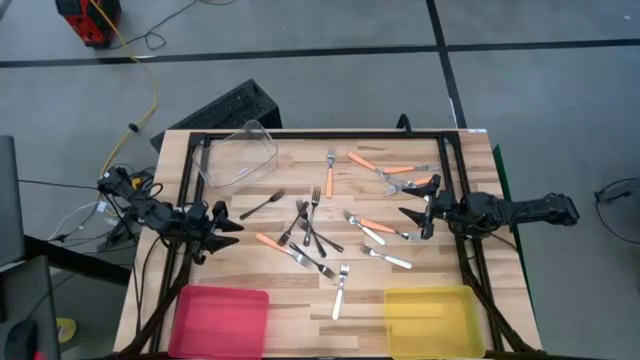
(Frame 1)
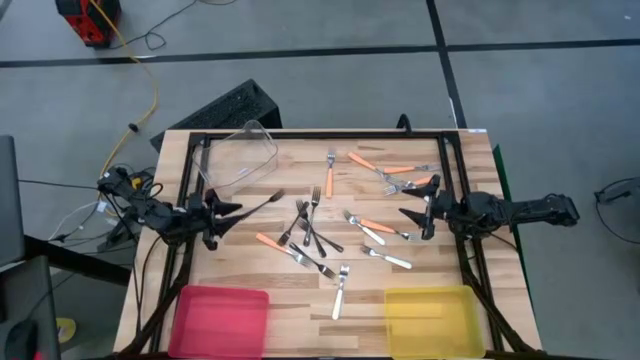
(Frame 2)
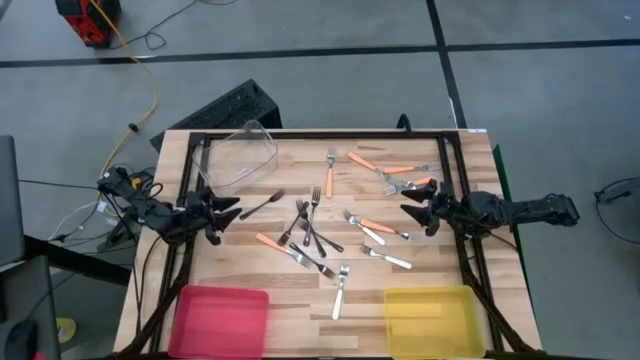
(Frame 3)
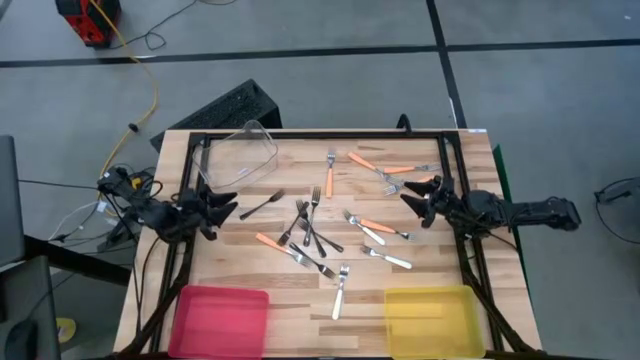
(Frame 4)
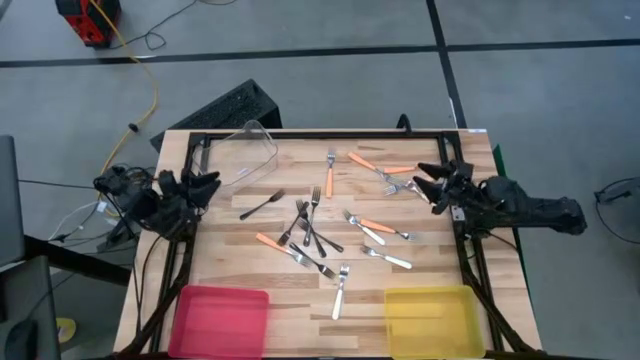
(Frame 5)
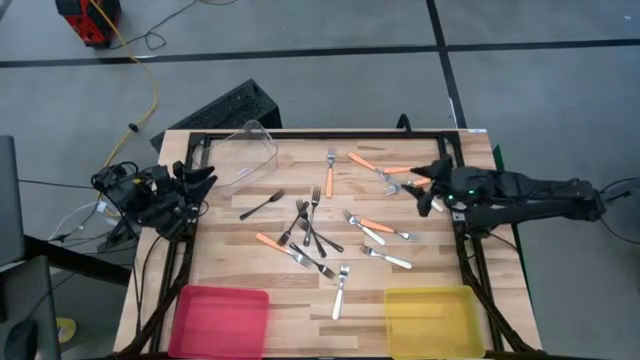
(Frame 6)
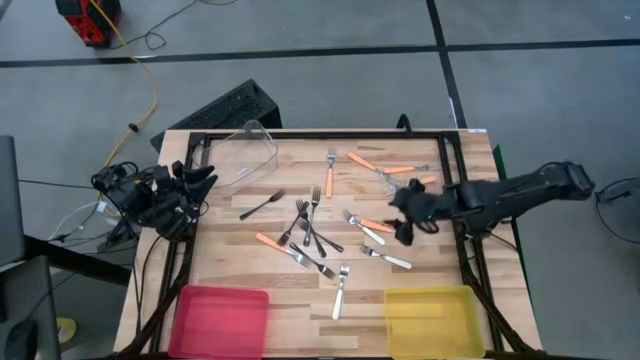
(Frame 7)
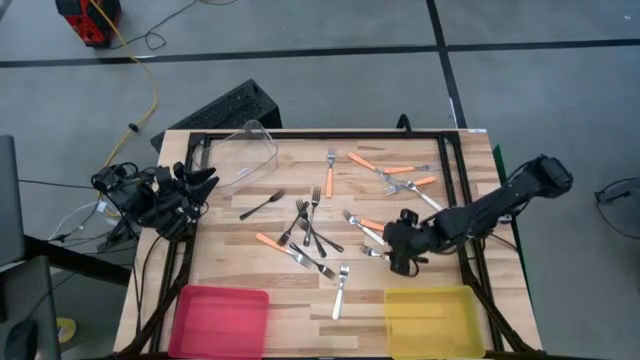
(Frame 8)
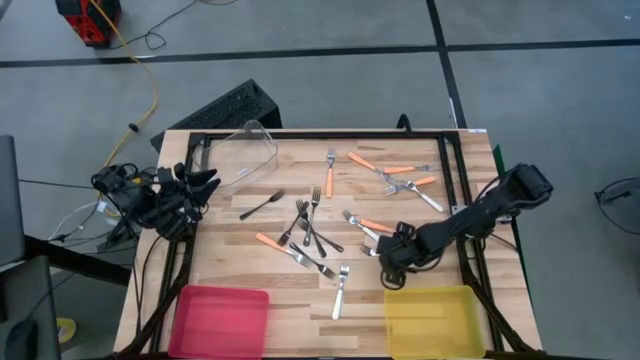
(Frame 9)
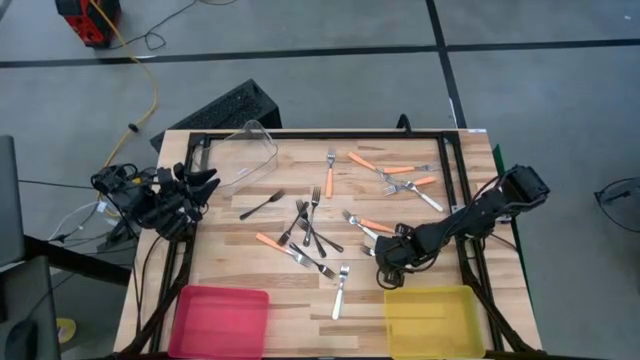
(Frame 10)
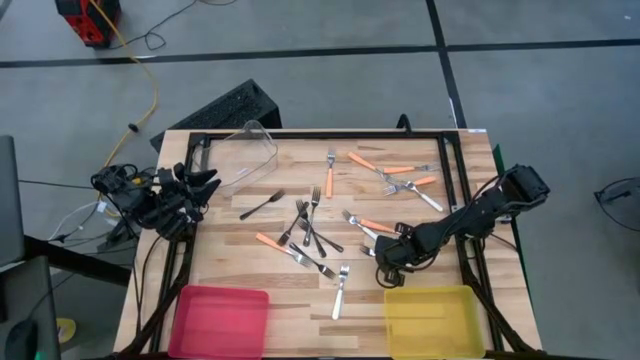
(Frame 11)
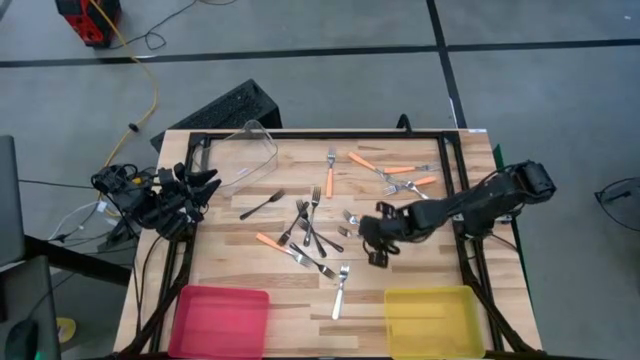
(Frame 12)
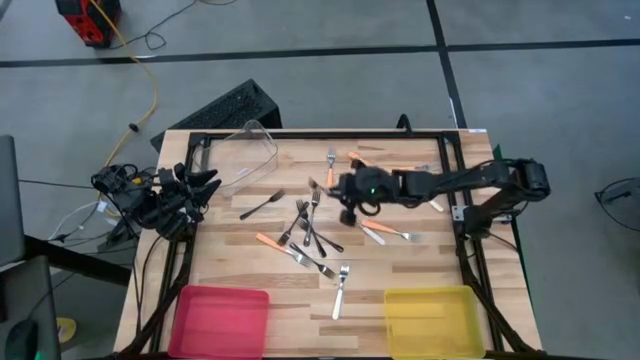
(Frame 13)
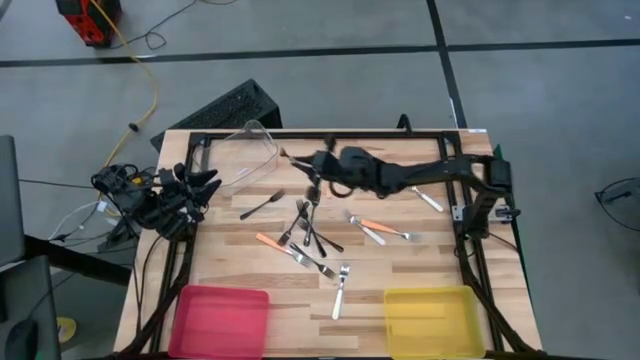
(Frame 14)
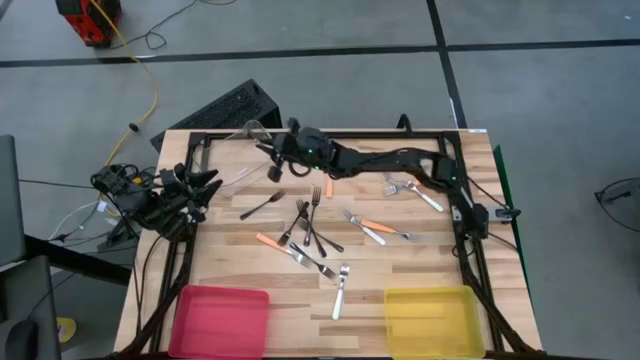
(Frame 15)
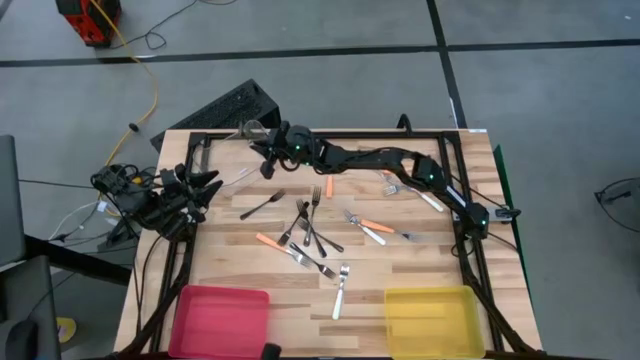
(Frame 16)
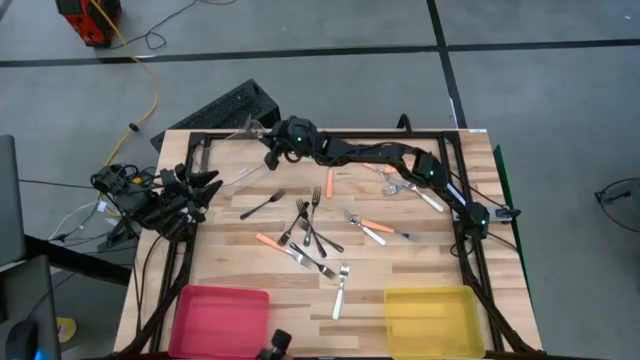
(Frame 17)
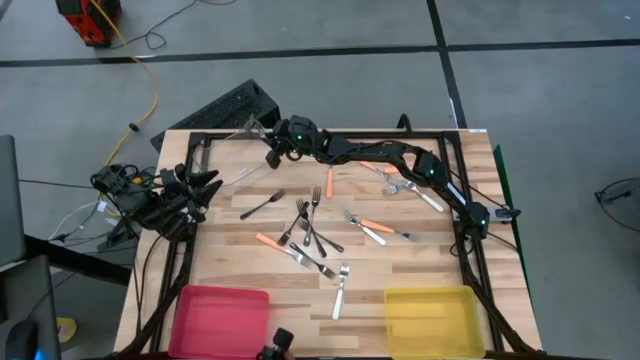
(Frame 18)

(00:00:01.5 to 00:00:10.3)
Task: Sort silverware by color (type)
Put the white fork into the transparent bin

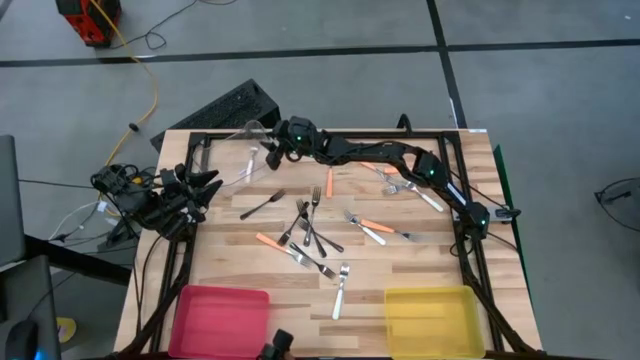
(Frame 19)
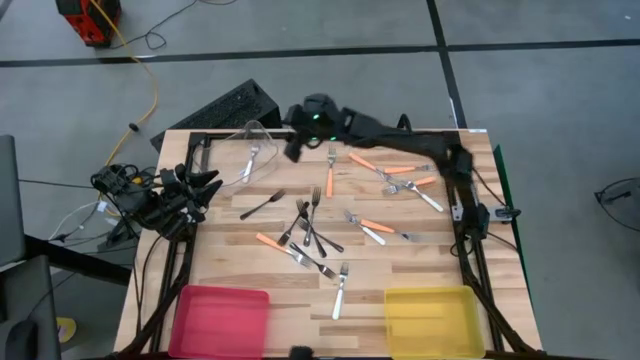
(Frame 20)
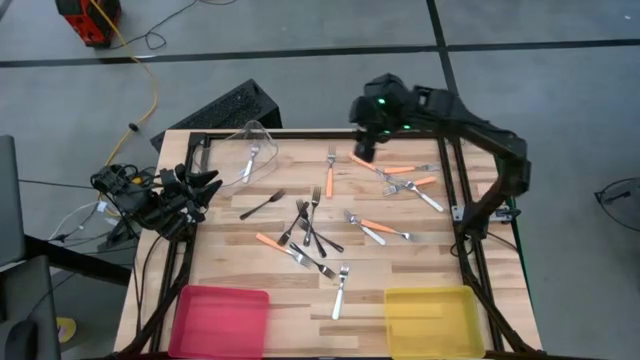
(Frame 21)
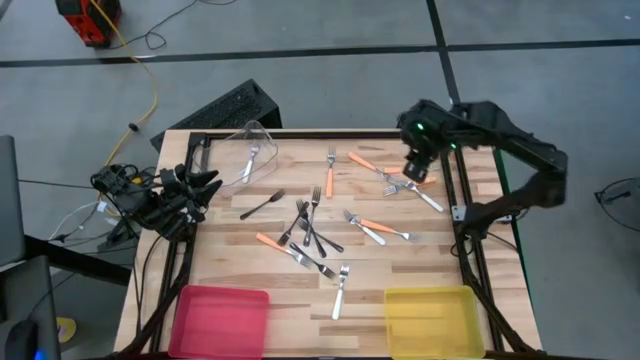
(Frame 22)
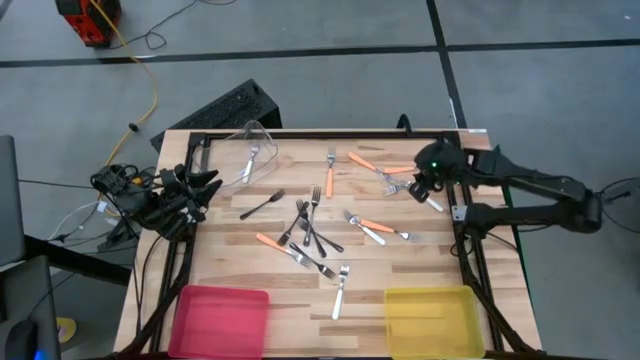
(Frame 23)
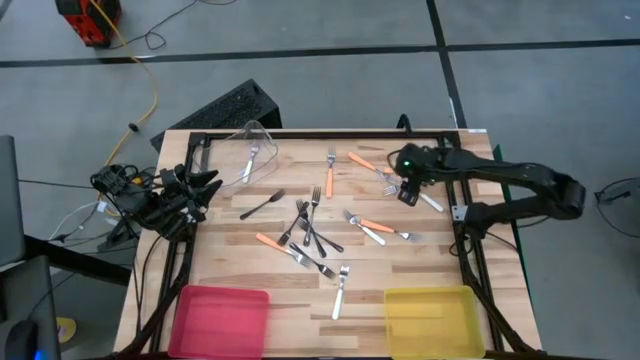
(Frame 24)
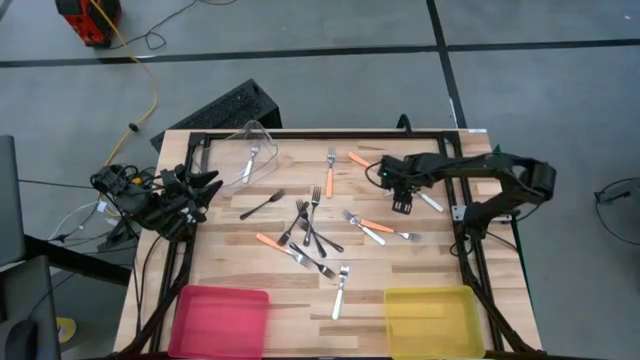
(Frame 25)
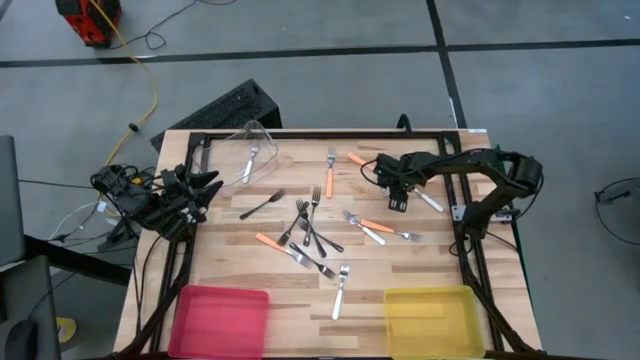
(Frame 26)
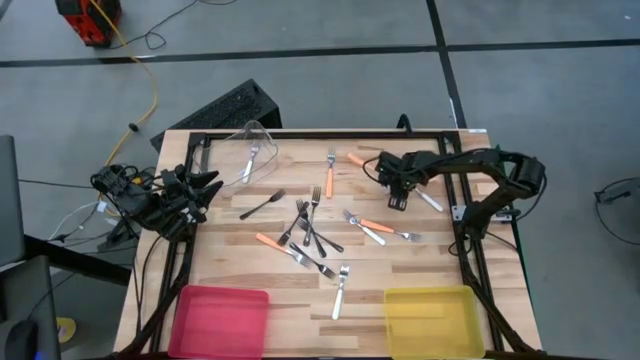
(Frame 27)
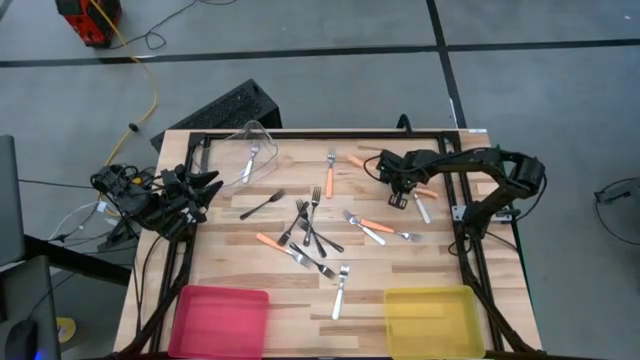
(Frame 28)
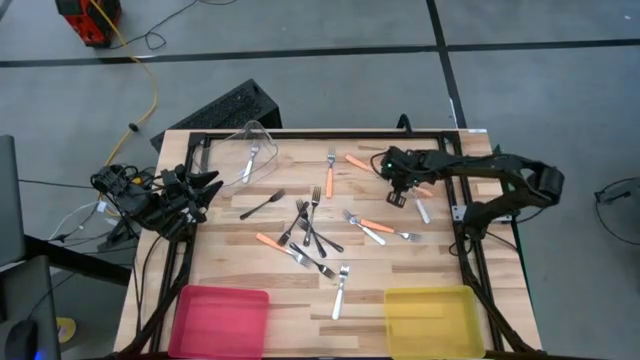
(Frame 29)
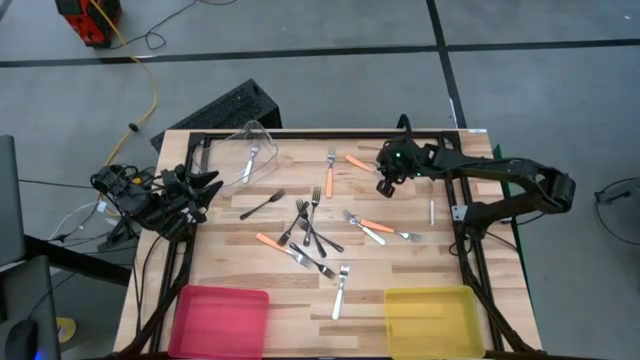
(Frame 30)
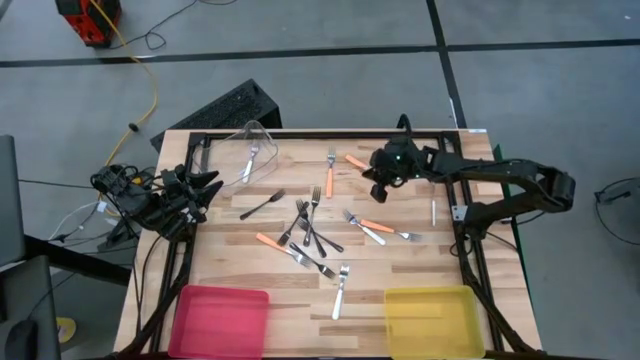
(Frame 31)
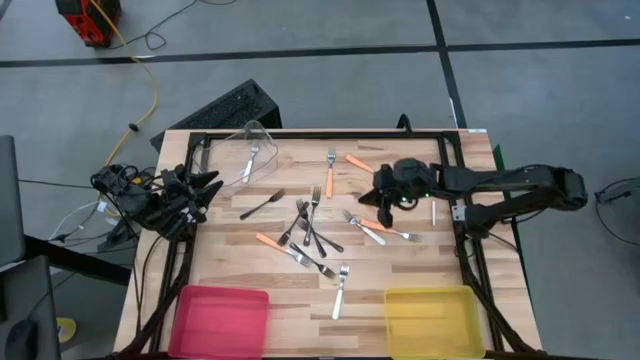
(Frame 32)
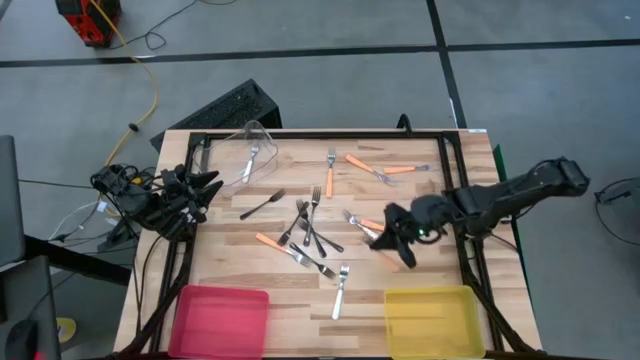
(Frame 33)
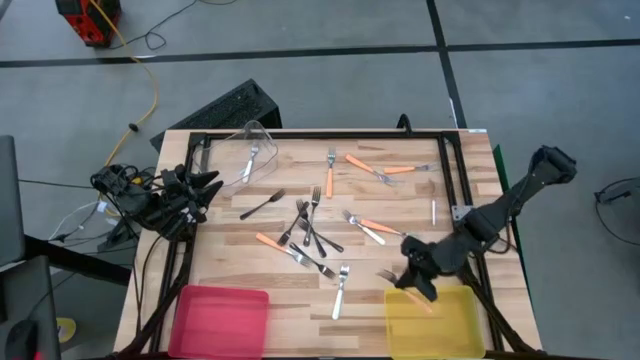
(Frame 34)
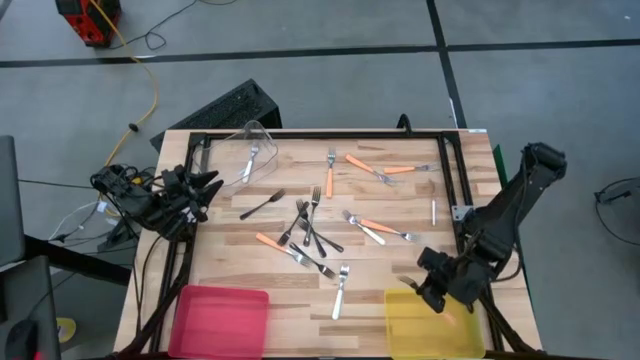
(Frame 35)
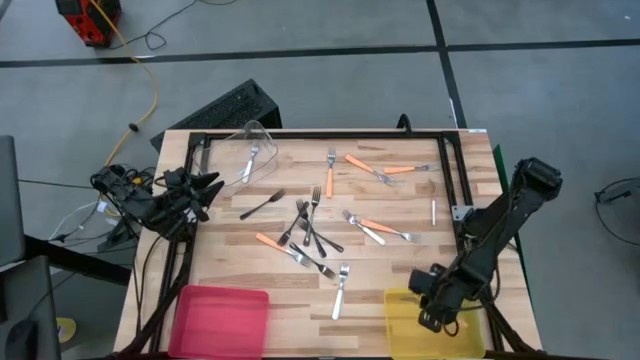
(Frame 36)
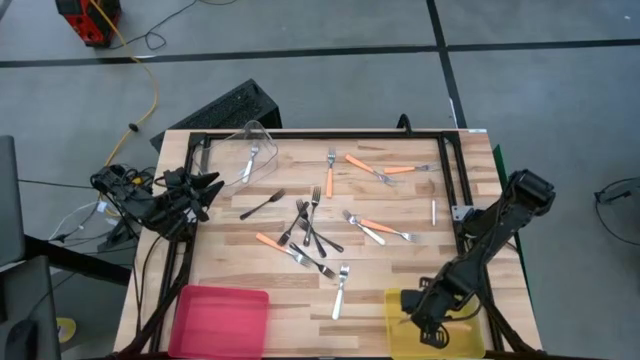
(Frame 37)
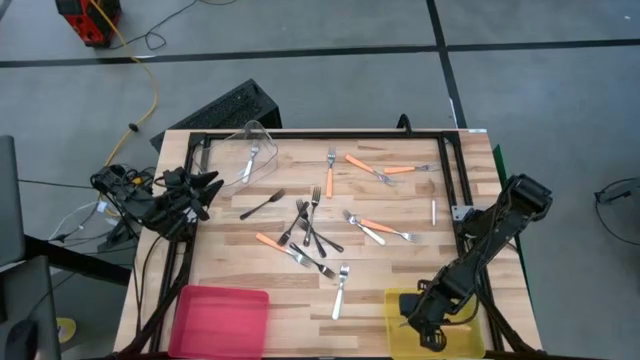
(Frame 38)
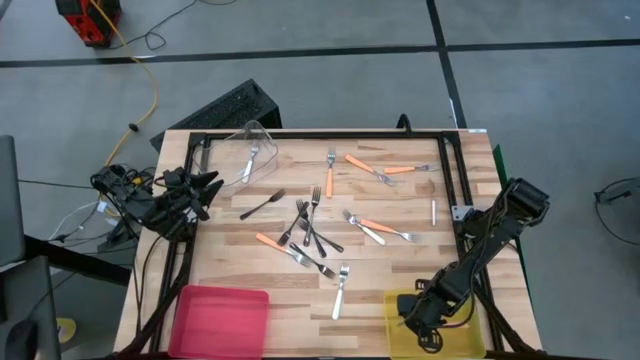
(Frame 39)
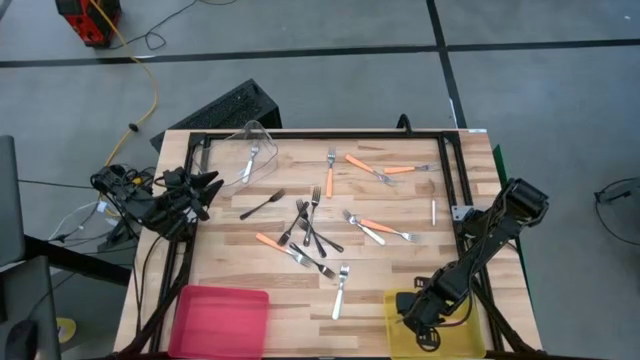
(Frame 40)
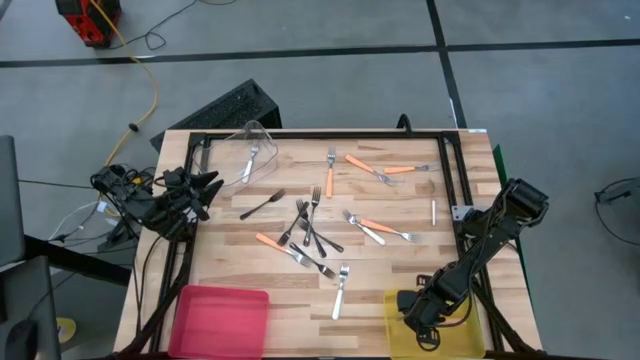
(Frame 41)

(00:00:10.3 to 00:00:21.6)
Put the orange fork into the yellow bin

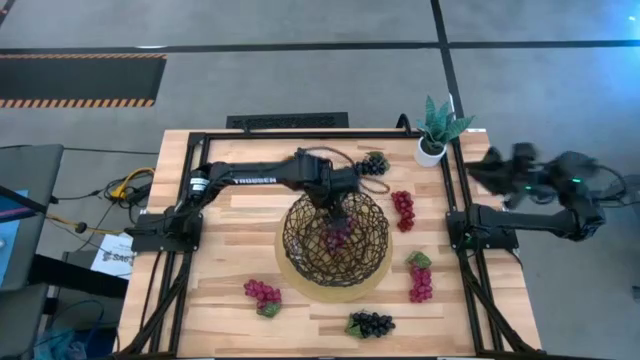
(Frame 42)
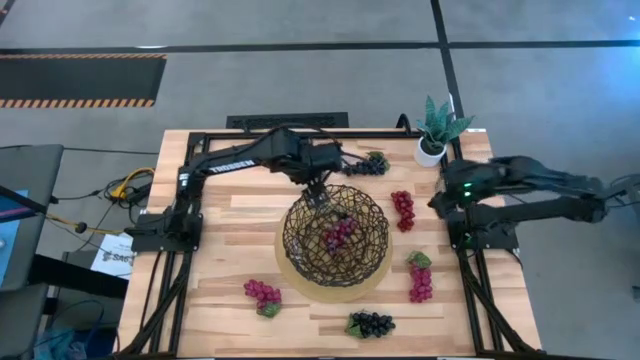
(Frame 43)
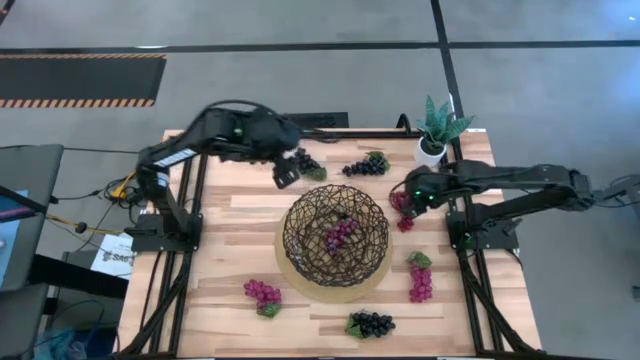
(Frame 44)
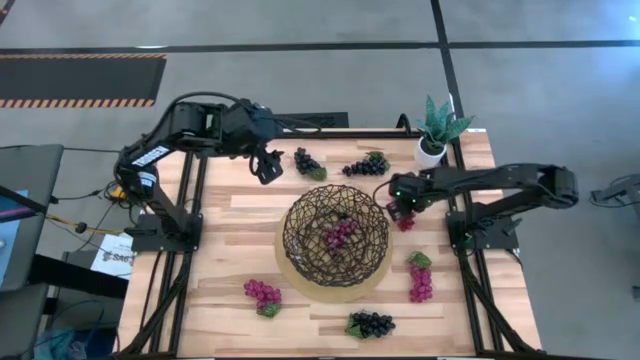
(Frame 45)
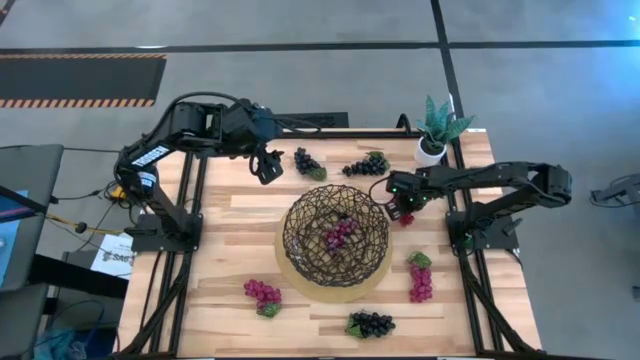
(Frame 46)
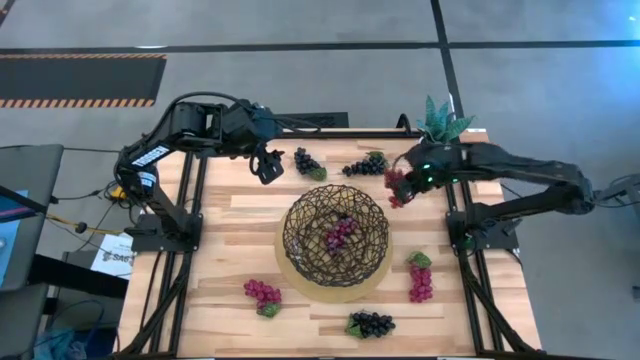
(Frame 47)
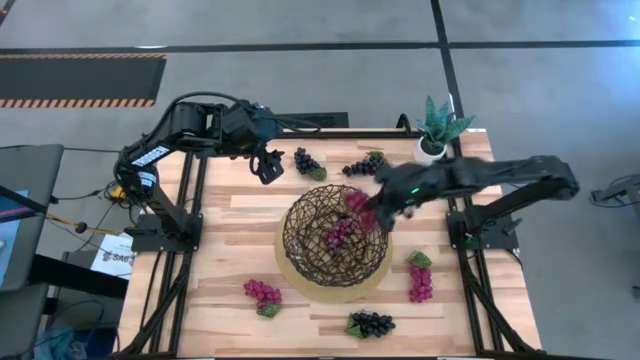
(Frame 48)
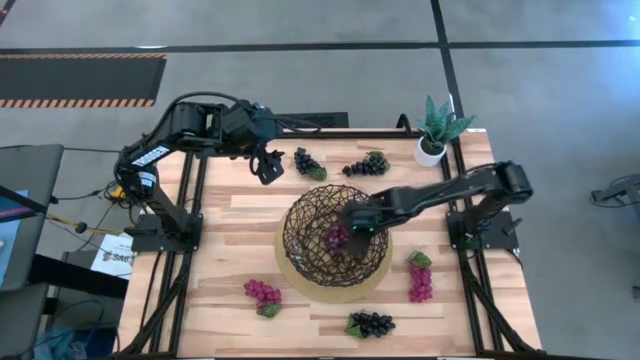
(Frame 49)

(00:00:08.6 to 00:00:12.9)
Task: Build produce basket
Put the red grapes into the black wire basket
